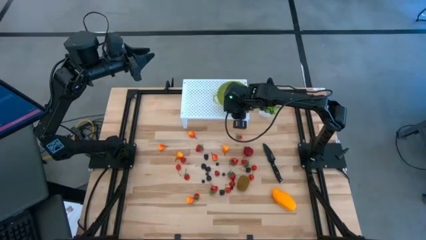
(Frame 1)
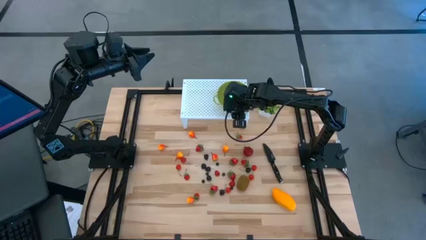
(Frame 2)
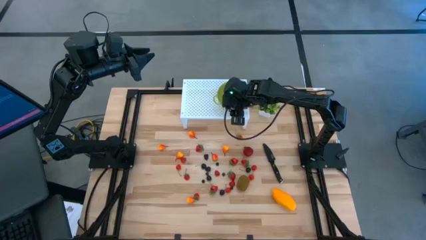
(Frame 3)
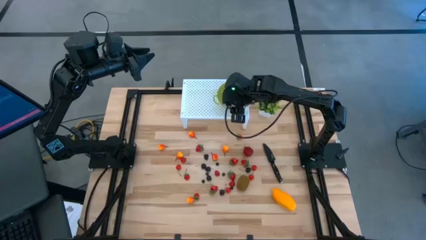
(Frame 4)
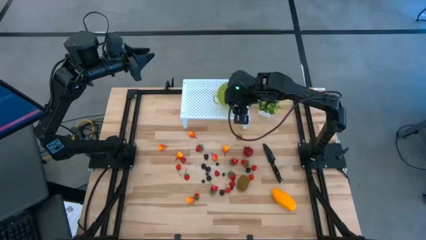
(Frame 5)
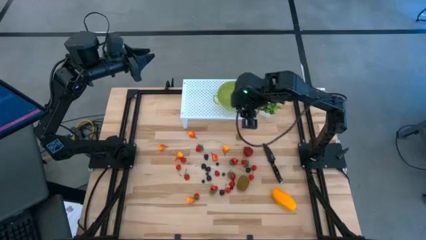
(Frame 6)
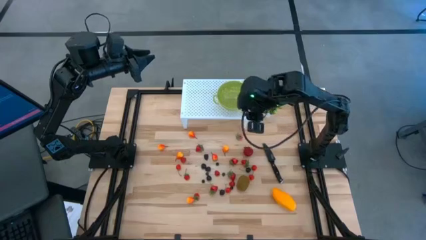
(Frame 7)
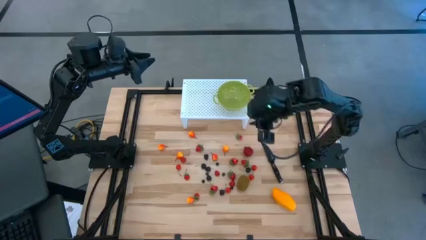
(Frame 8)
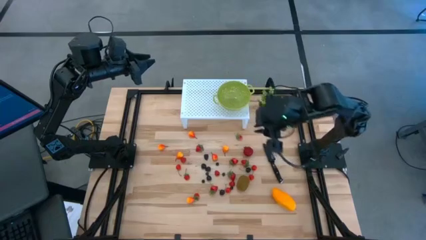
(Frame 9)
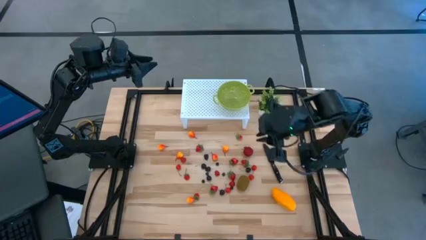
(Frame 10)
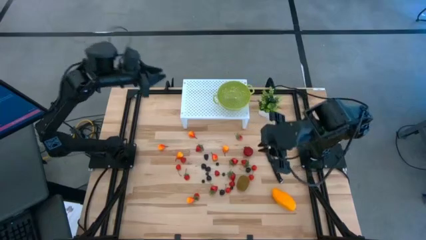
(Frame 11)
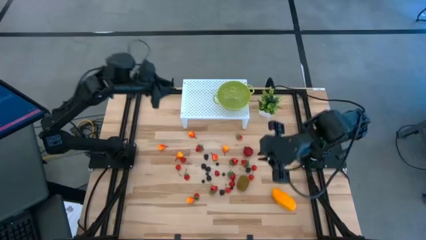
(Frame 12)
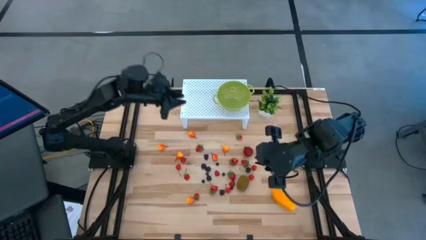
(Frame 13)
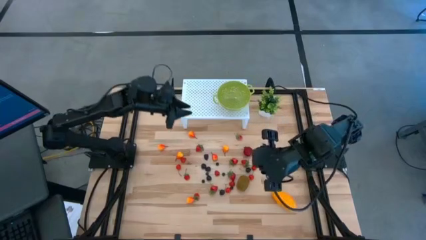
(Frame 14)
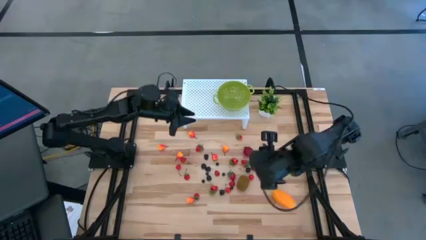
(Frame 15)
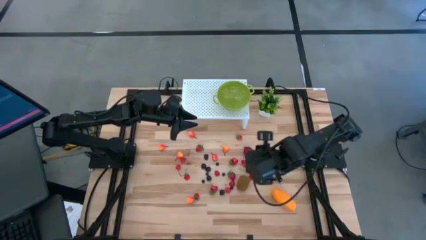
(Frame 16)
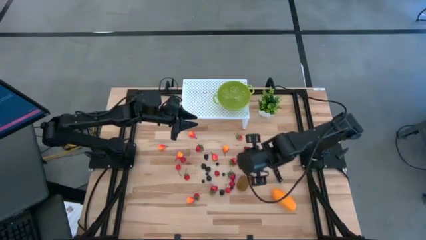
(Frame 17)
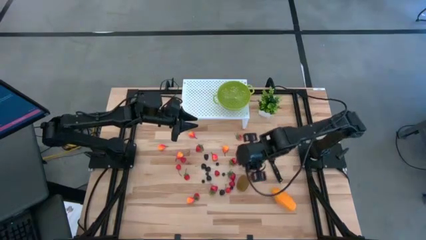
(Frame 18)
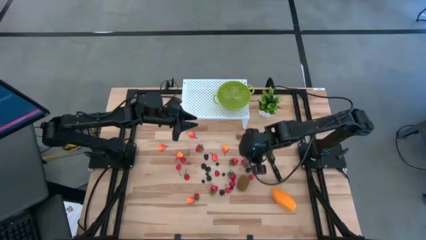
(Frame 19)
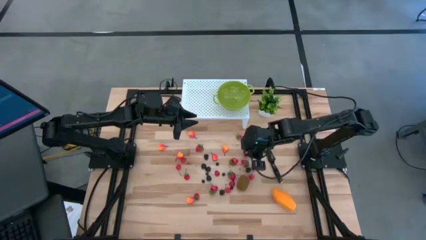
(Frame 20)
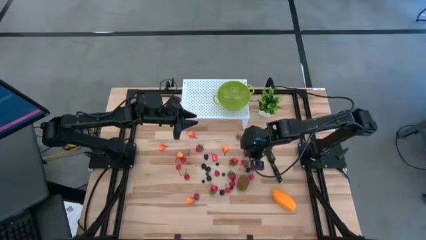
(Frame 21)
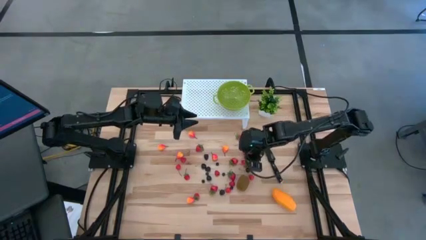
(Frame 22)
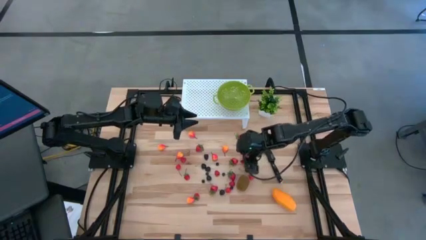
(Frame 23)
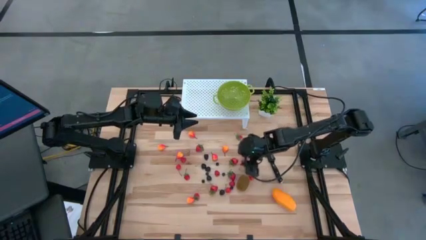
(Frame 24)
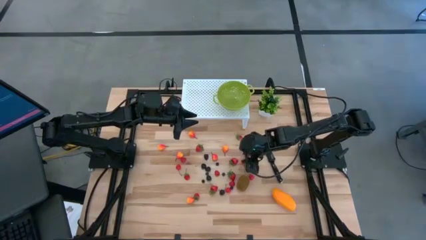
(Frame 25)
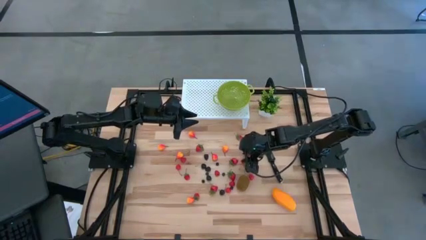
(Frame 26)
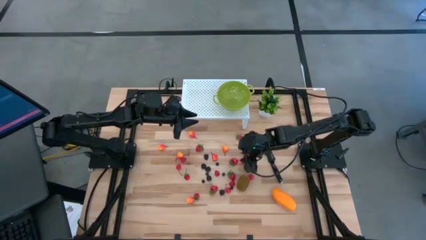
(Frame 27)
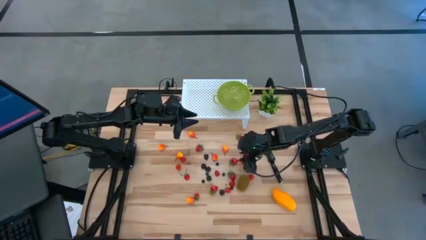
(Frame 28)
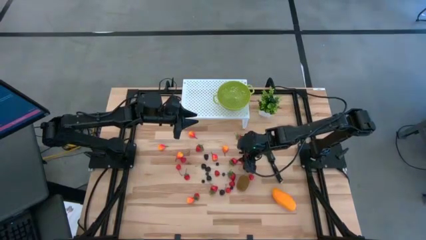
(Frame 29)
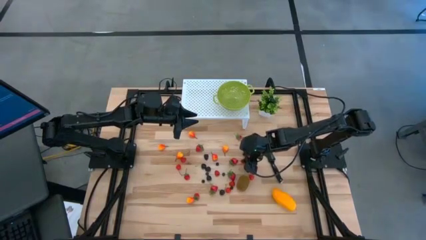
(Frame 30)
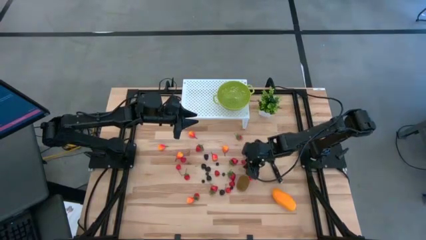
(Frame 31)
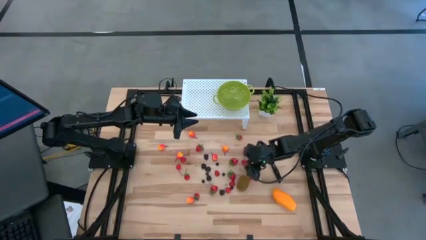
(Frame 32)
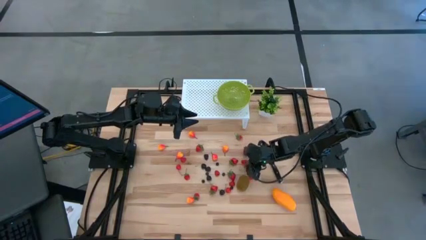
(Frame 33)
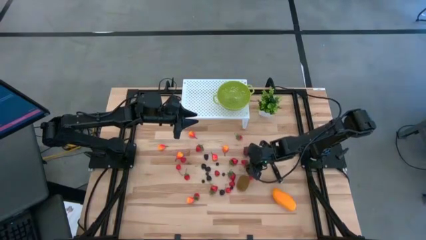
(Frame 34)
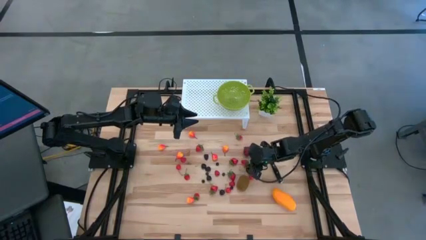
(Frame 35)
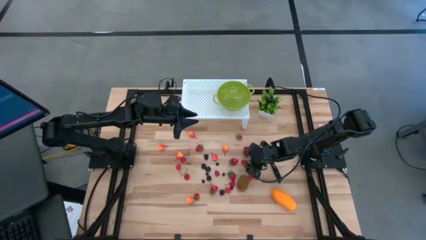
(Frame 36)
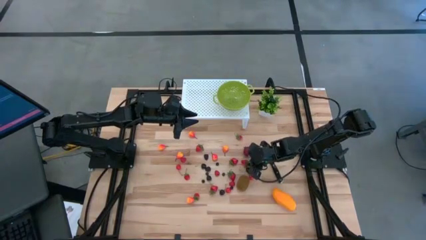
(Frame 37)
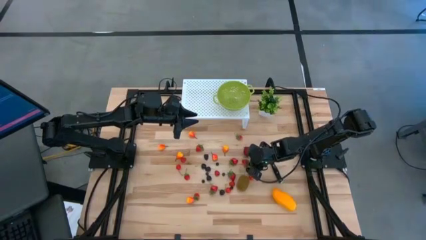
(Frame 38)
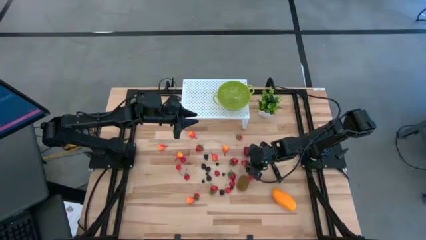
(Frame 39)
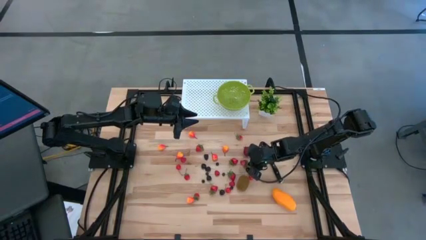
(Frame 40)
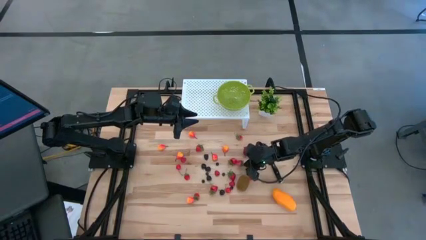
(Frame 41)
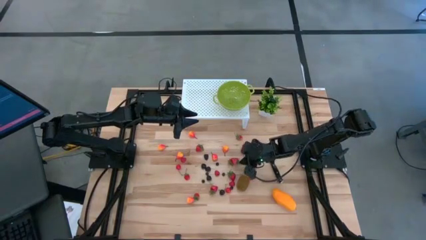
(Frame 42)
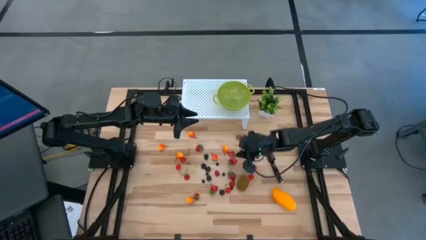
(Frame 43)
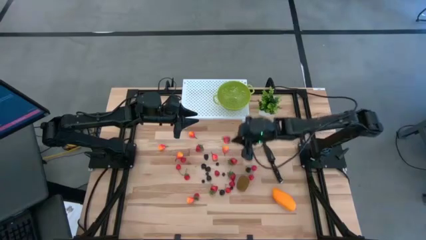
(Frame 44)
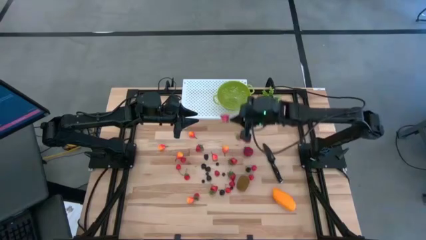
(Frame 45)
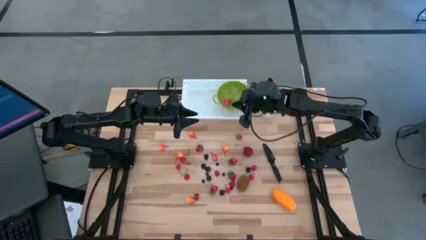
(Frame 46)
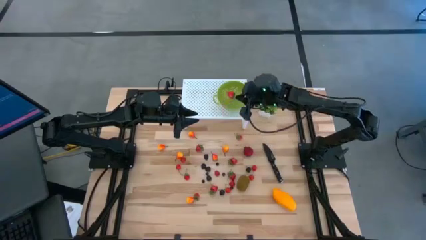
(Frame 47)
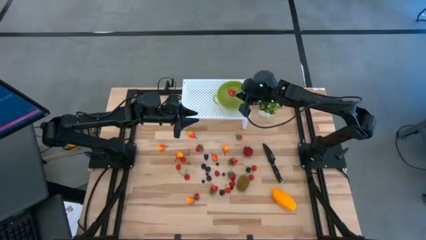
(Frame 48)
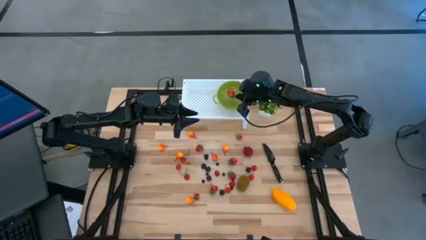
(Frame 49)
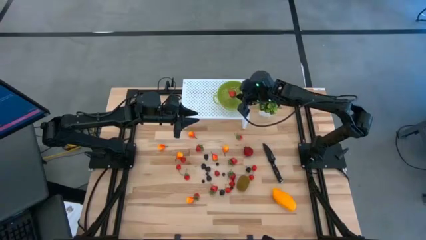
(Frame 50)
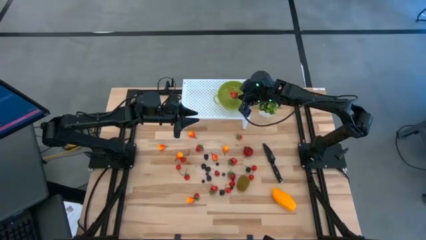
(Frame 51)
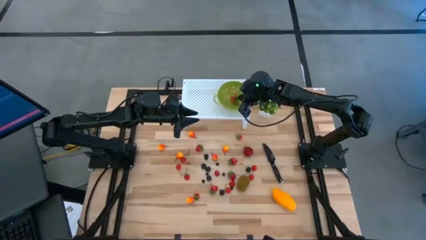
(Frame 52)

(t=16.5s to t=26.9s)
Task: Pick & Place Fruit
Put the red strawberry into the green strainer bowl

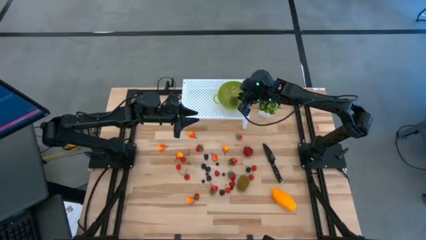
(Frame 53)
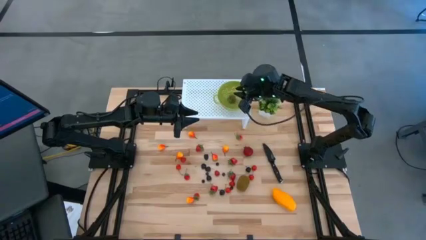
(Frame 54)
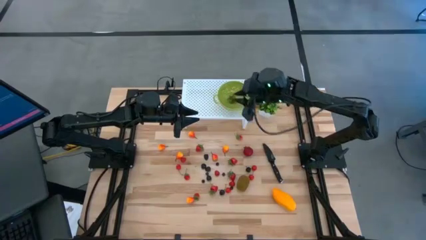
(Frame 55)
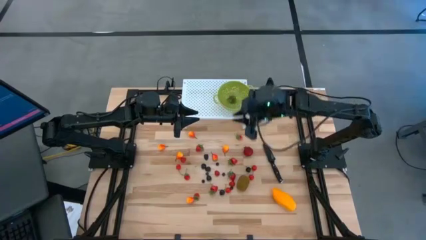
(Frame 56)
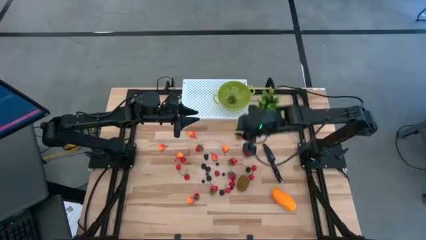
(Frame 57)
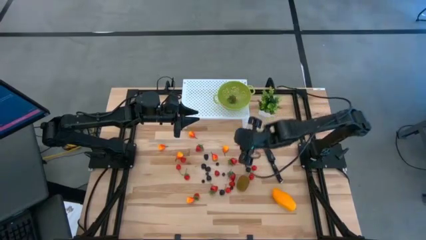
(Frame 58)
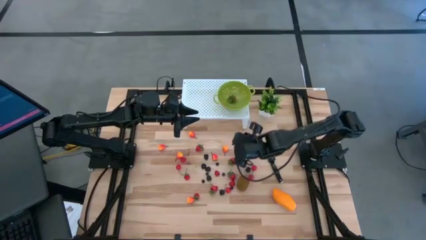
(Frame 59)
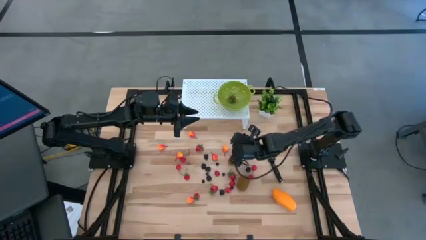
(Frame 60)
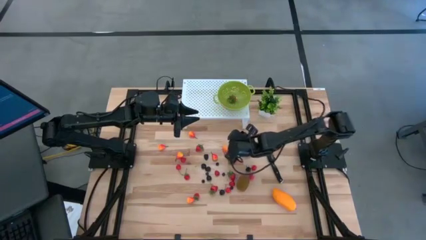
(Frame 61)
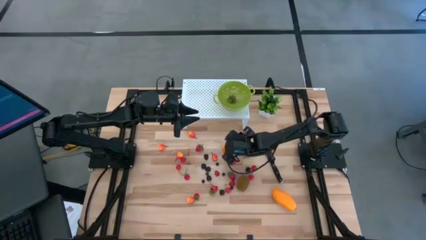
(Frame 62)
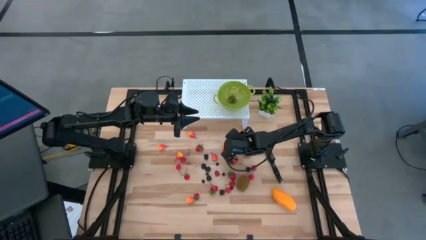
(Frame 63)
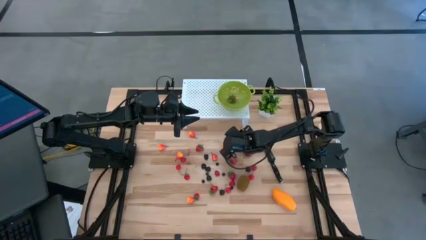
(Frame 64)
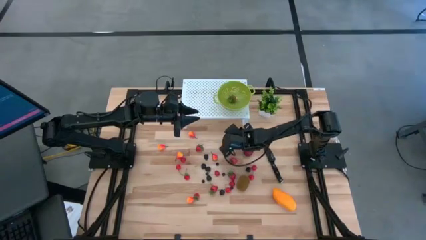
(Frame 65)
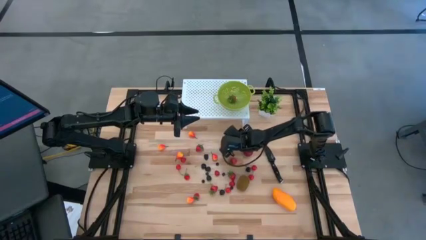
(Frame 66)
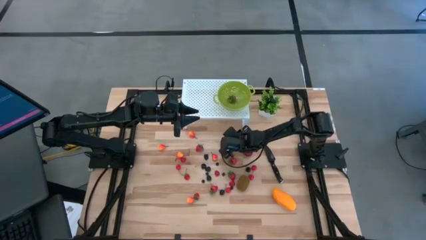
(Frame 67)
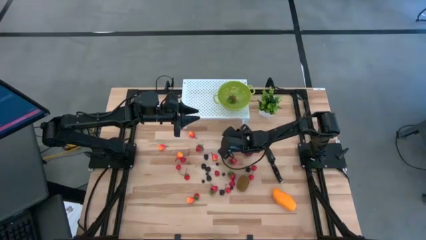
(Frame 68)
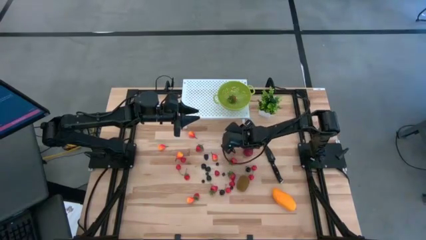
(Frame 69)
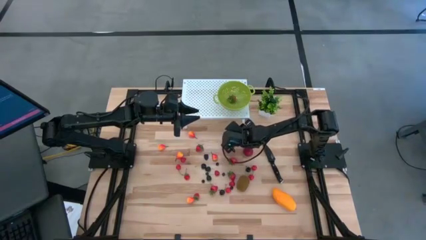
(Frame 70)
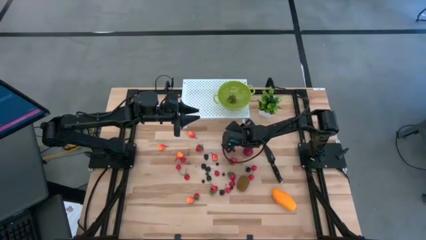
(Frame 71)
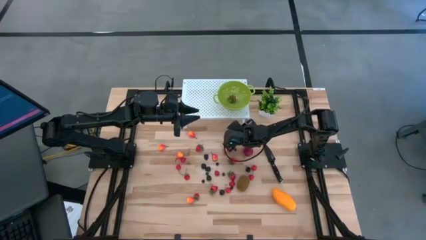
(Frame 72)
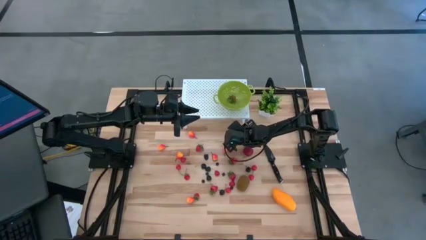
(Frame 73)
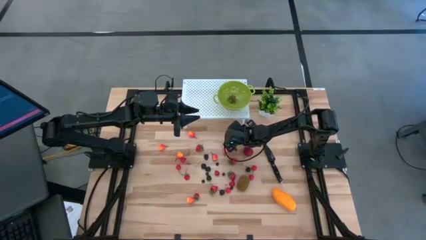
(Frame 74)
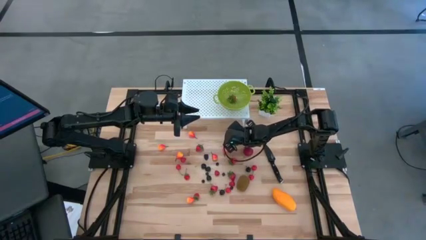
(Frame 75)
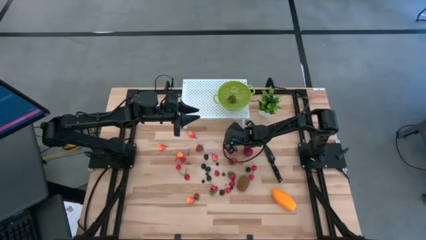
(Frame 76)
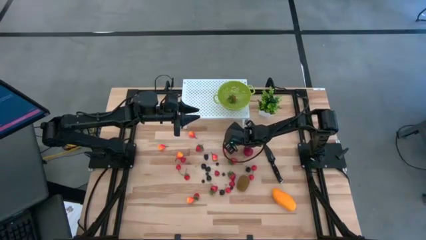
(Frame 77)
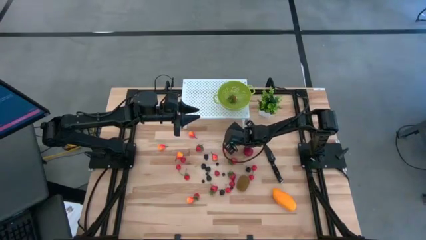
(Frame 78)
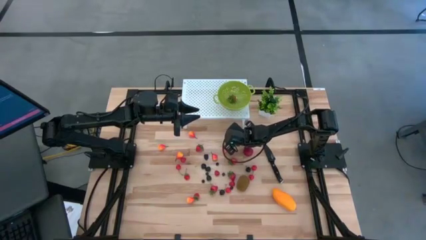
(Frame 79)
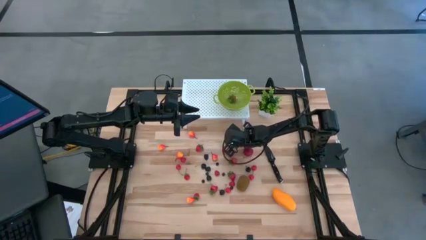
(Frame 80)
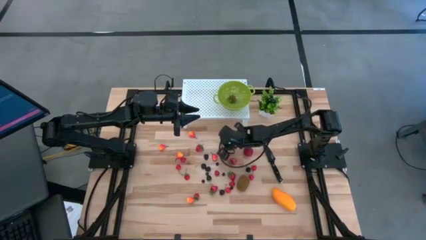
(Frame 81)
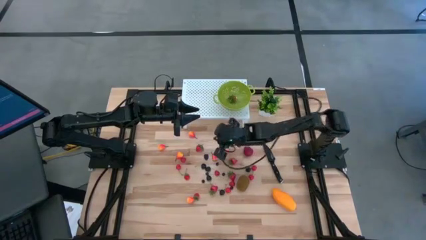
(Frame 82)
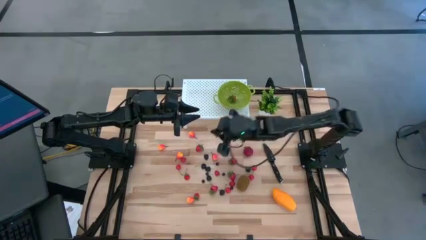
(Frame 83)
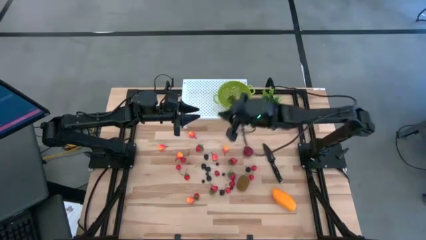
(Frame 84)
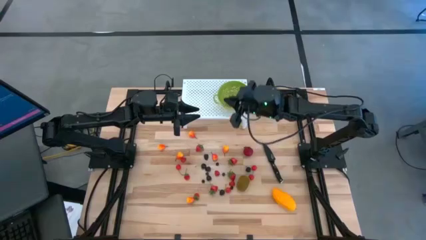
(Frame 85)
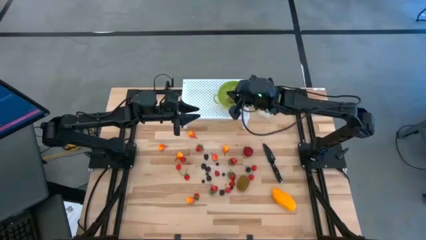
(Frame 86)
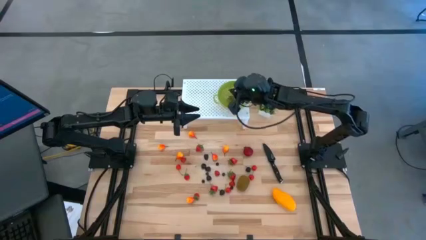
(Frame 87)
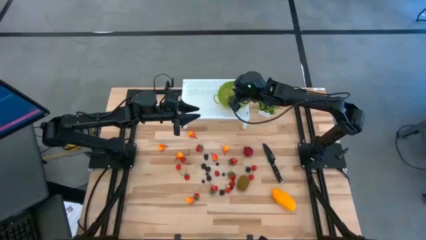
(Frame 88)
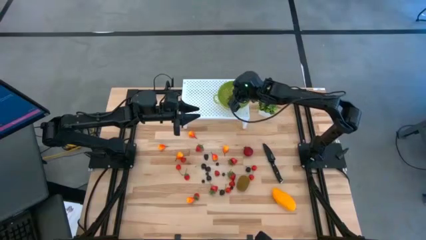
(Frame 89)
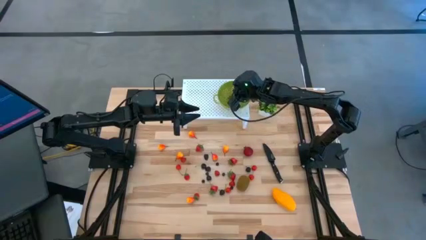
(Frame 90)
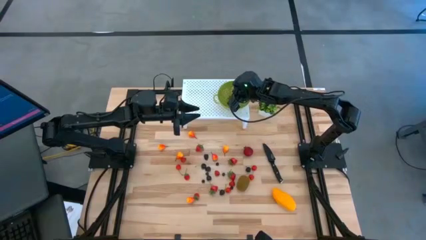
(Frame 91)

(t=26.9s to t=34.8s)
Put the red strawberry into the green strainer bowl
